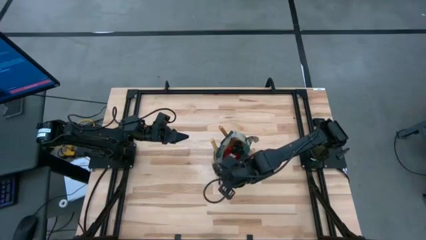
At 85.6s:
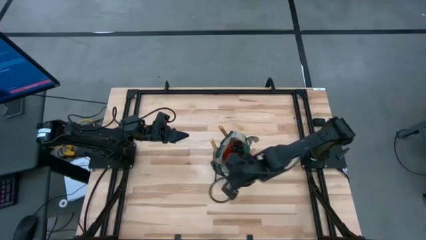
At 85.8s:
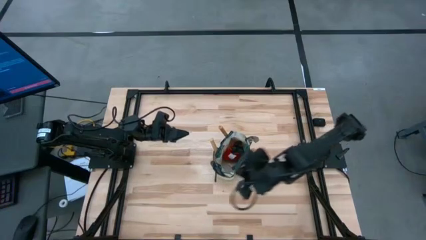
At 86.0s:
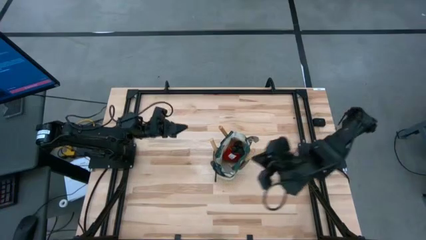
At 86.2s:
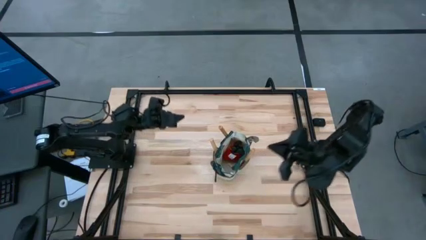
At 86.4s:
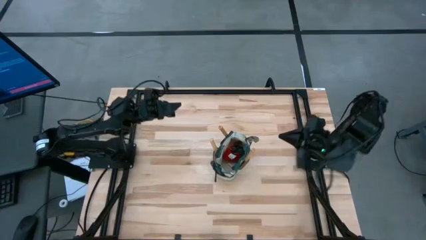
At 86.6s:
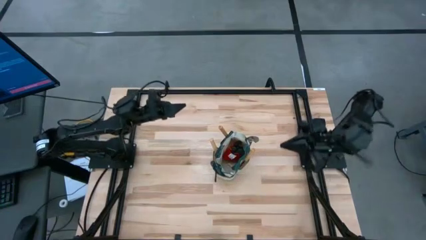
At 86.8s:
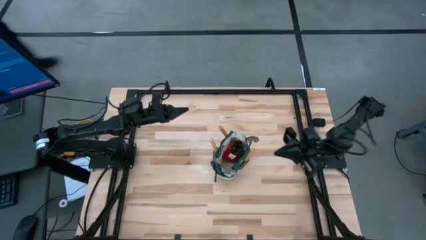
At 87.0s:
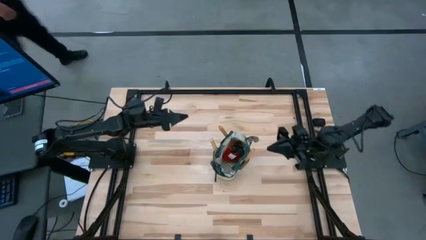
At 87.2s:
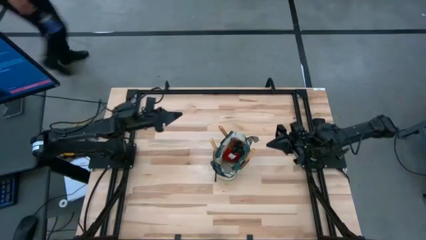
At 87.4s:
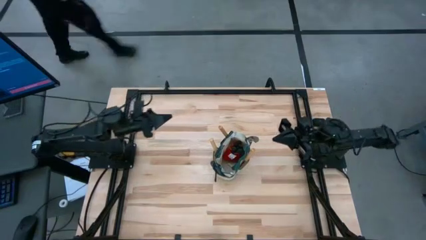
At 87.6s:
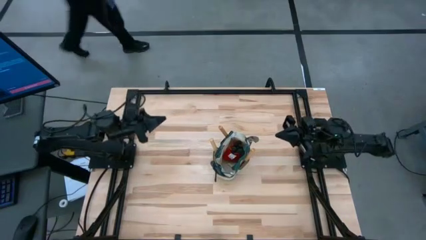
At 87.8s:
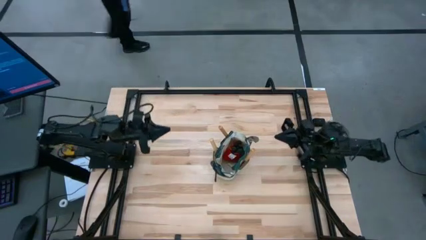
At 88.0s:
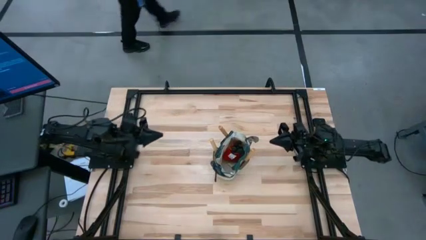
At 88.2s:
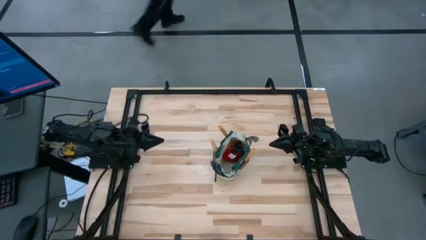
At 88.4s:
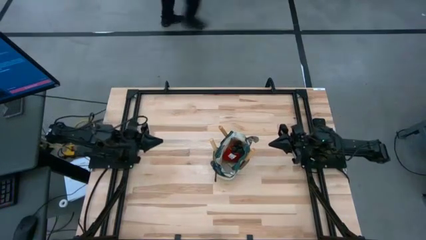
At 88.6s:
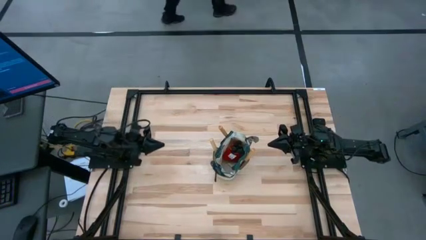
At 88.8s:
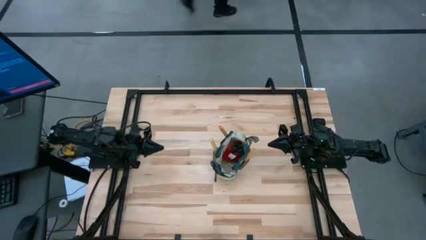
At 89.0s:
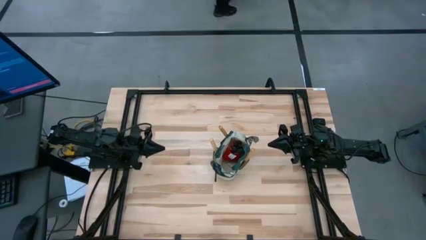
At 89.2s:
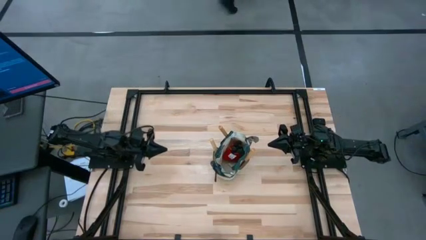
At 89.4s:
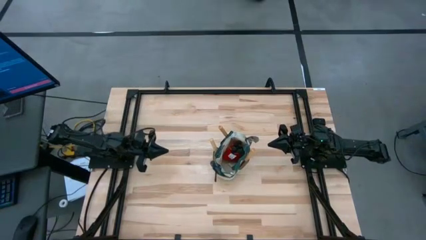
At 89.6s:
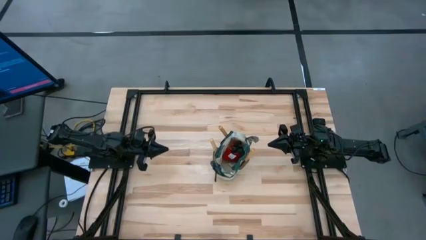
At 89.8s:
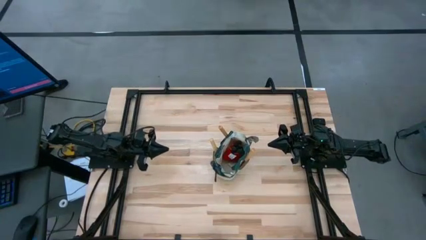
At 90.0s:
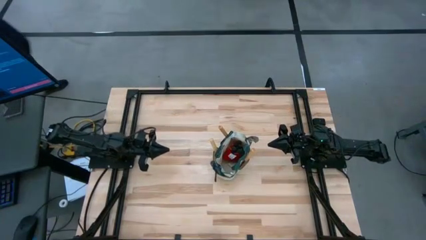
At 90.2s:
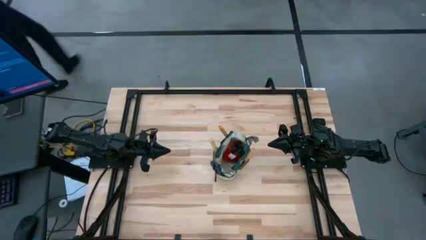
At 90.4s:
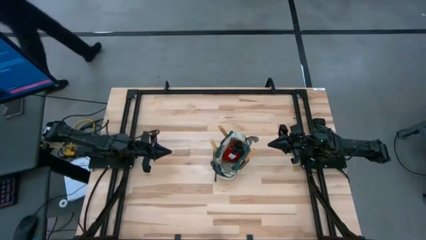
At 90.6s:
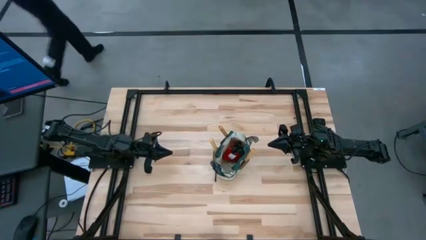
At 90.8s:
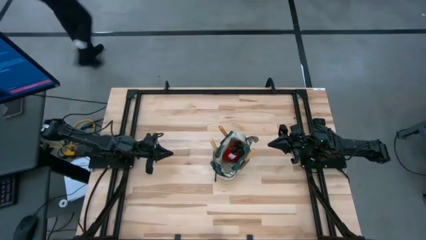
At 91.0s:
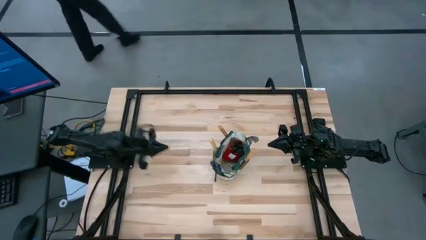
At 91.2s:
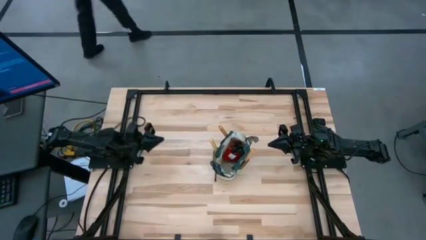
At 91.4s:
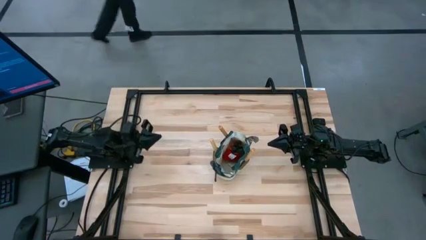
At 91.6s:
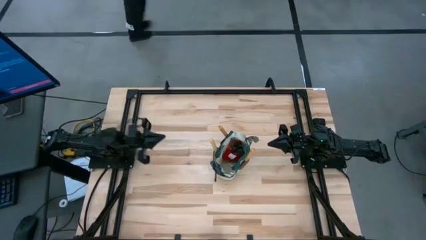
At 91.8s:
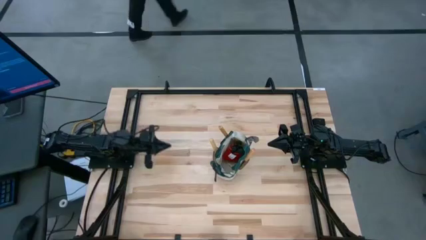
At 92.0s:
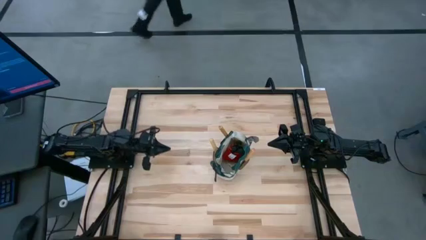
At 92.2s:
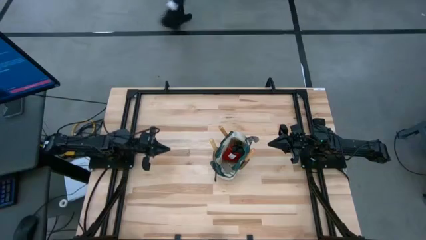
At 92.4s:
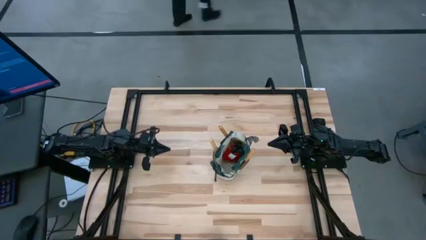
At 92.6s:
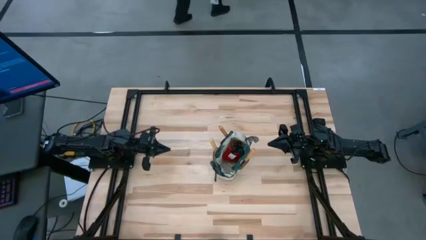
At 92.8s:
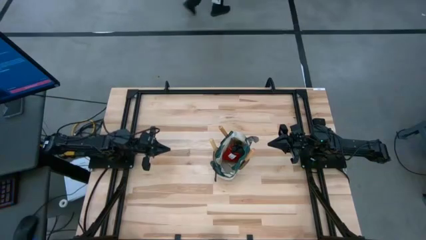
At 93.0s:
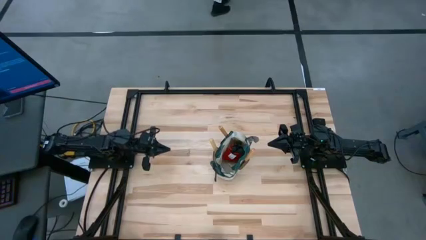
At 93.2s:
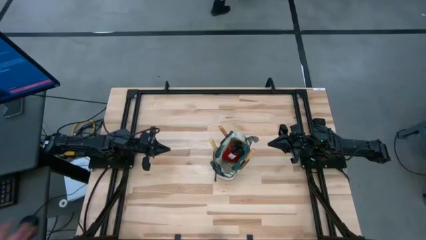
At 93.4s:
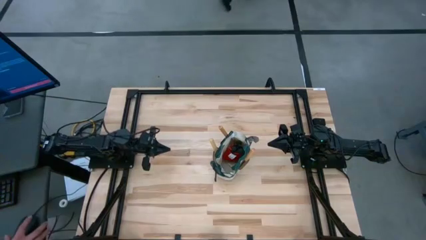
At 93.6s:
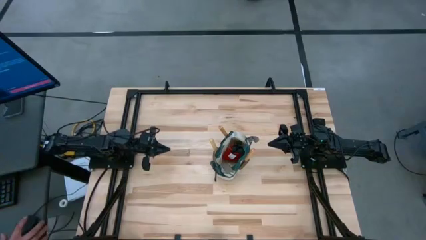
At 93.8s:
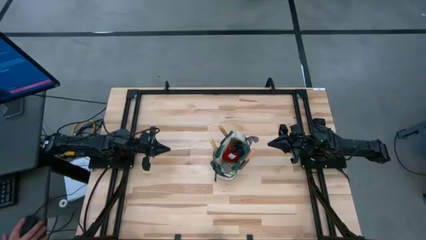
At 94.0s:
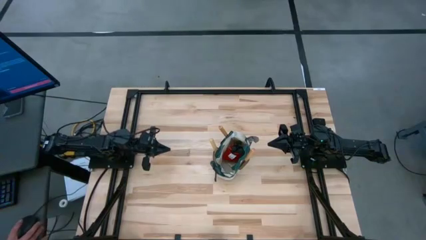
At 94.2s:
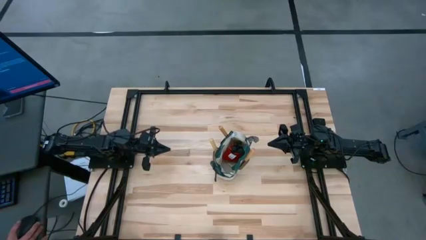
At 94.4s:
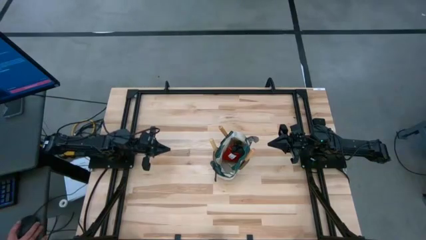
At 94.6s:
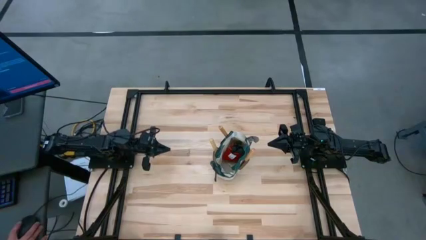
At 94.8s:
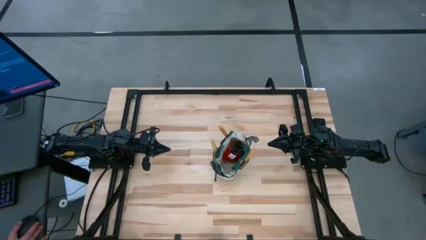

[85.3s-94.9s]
Task: Pick & Place Garden tools in Gardening bag
Return to Home Position

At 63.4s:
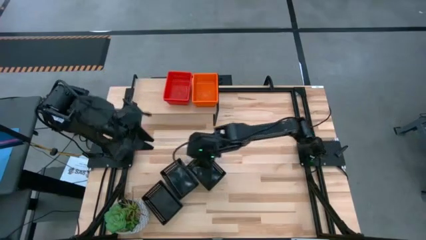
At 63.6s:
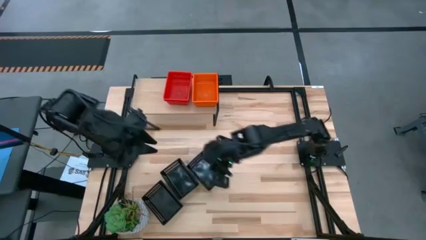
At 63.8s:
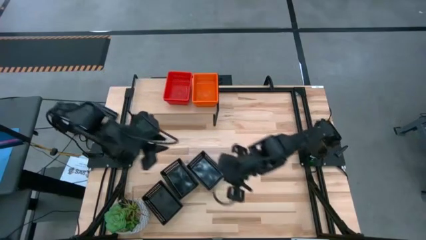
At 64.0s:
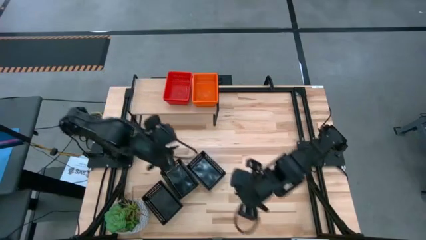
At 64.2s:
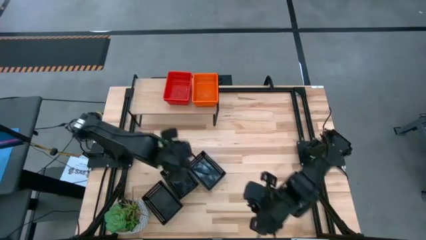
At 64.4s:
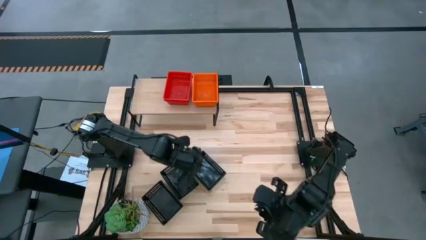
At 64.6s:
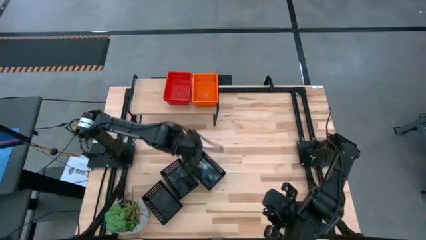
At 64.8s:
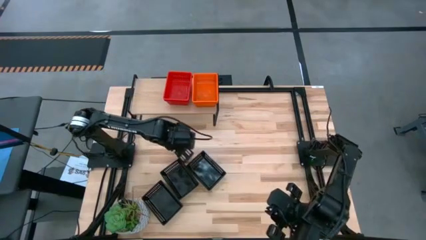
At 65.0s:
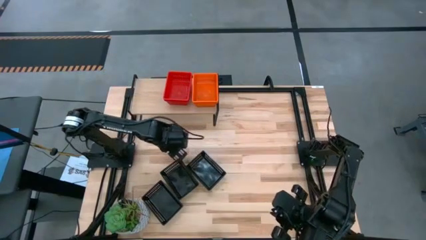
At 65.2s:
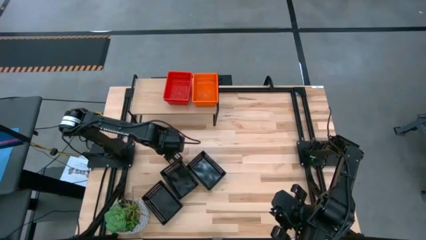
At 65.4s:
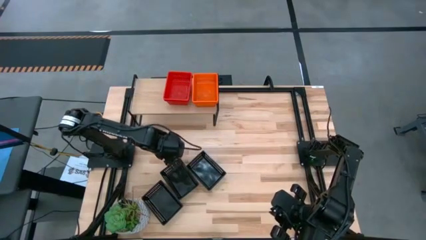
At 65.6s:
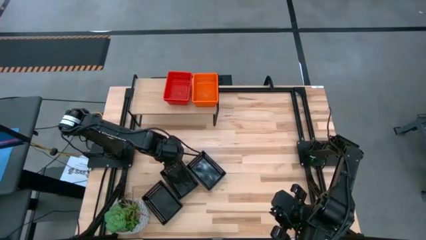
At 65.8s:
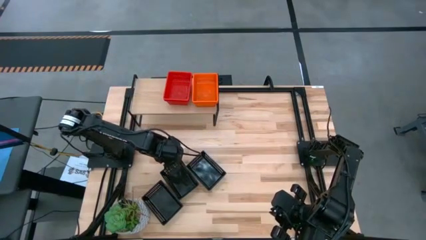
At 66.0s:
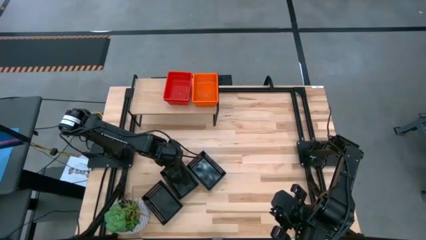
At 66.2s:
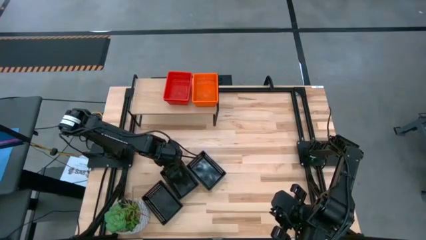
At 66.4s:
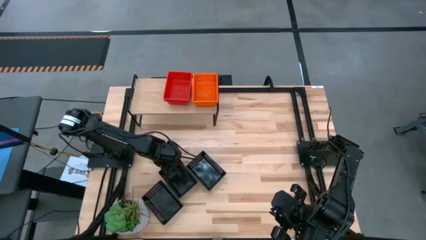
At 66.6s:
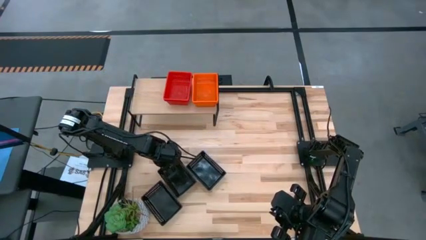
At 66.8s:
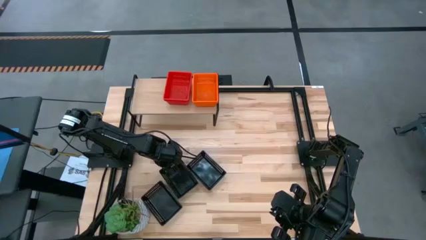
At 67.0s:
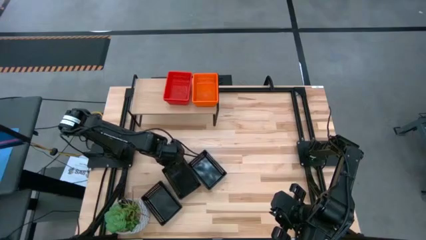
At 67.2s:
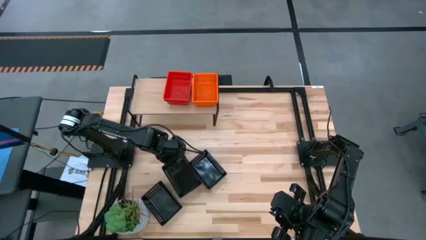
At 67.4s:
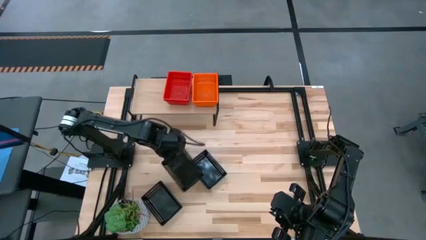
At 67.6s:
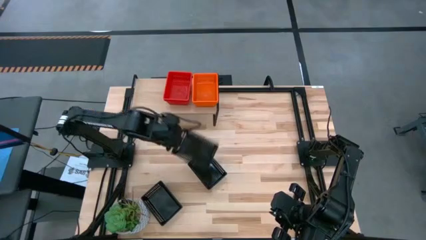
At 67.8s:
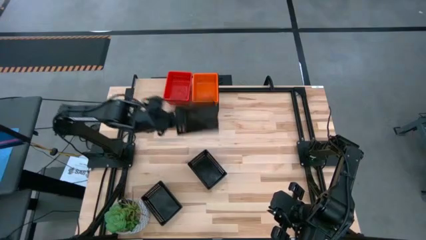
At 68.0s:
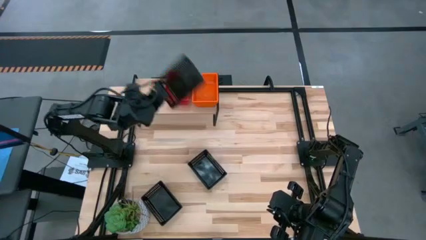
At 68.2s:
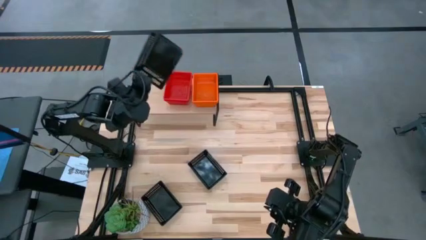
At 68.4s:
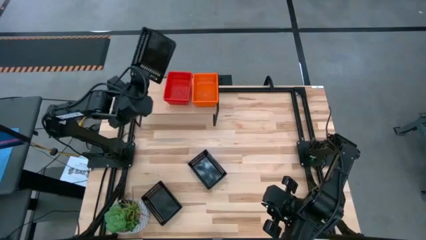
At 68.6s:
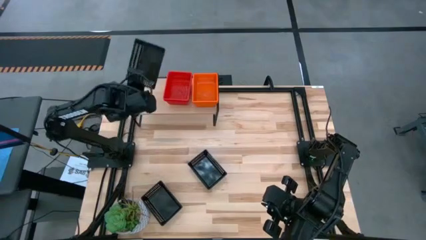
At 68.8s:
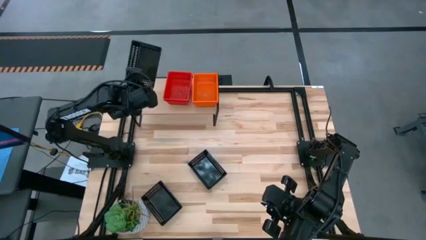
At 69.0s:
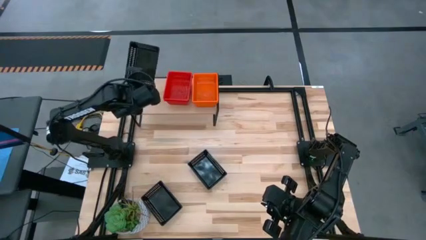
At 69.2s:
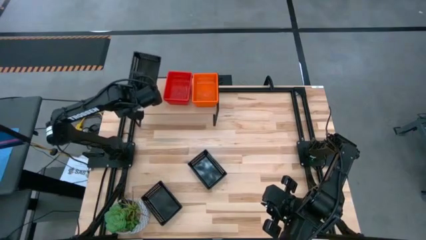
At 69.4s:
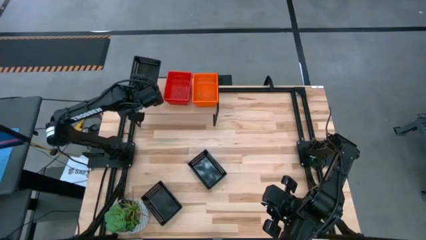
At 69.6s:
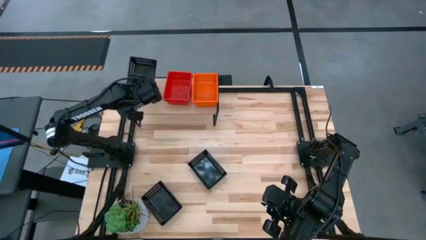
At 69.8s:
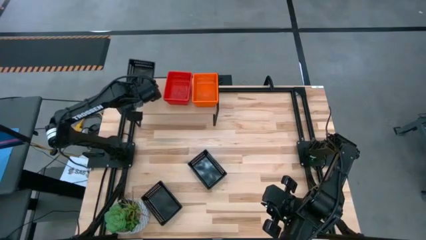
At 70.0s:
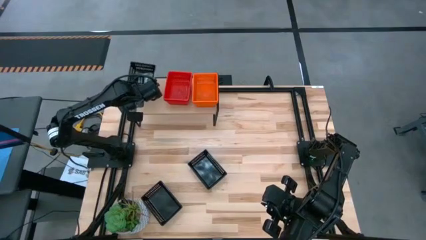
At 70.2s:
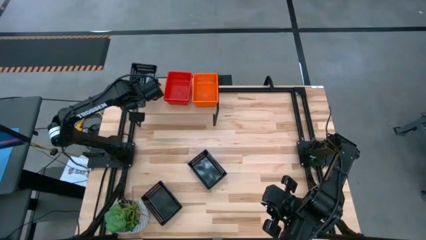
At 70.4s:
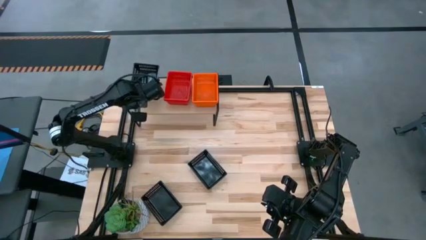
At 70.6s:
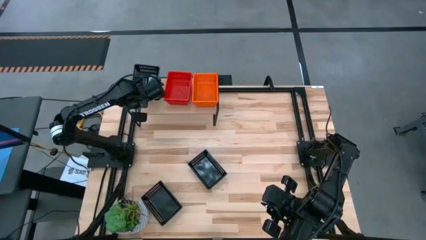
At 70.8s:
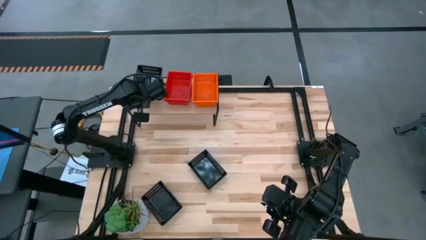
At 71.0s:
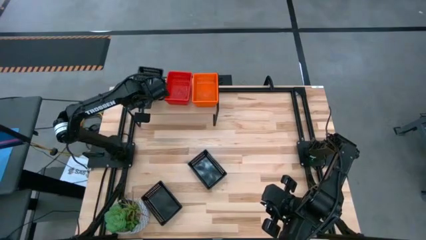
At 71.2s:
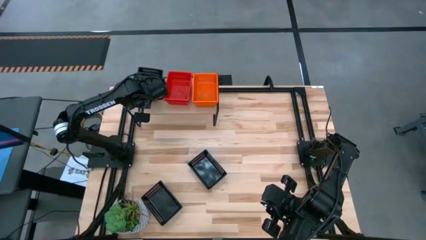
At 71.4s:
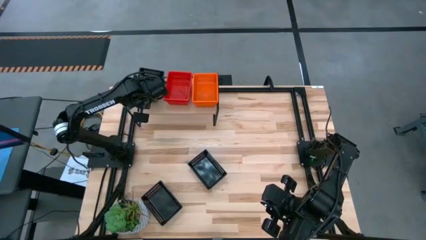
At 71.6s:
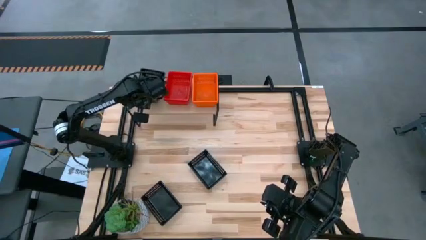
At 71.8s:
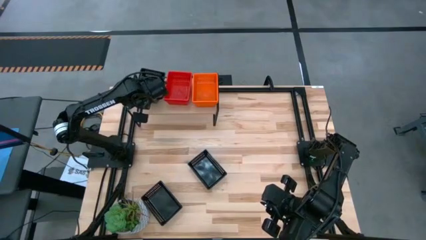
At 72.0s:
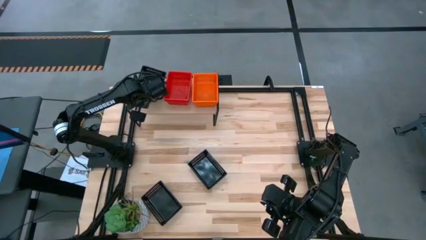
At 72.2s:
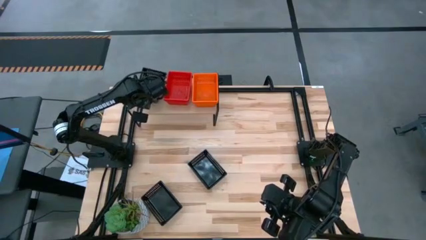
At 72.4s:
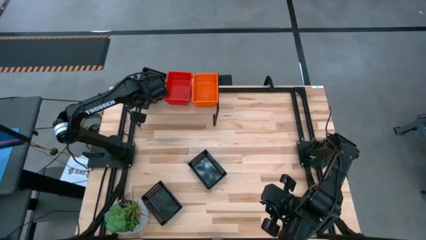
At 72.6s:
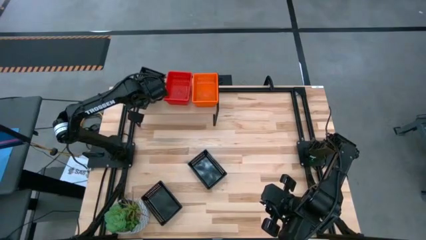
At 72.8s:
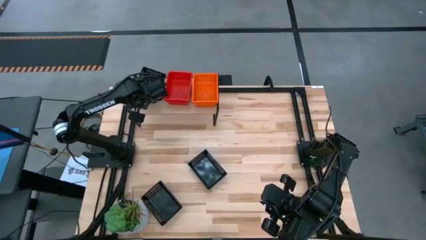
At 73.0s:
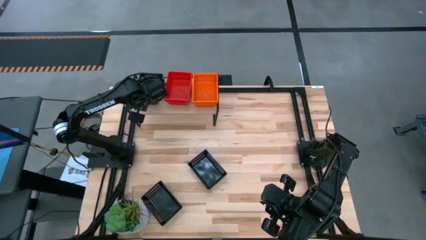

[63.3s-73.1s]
Task: Stack baskets on shelf by color
Put the middle black bin on the shelf
